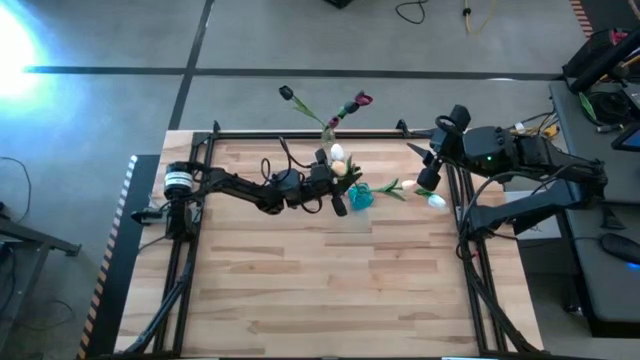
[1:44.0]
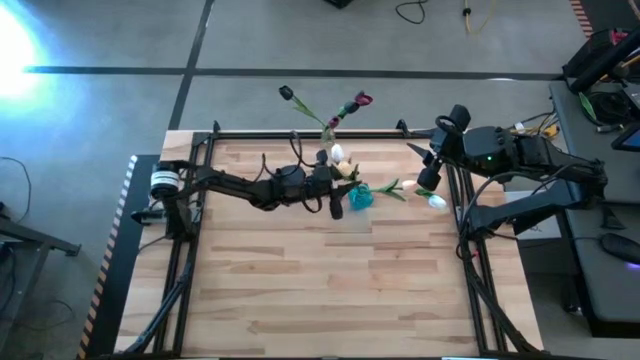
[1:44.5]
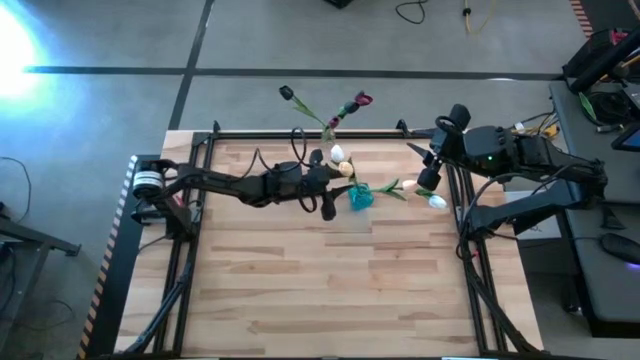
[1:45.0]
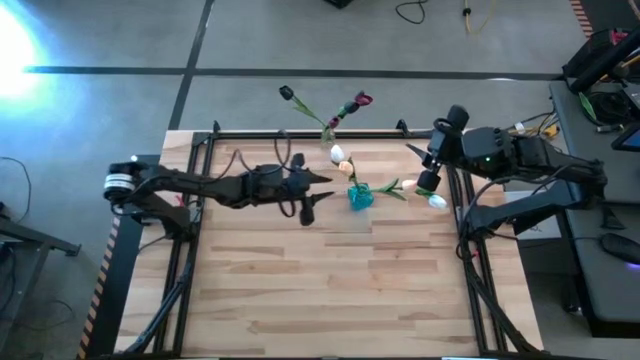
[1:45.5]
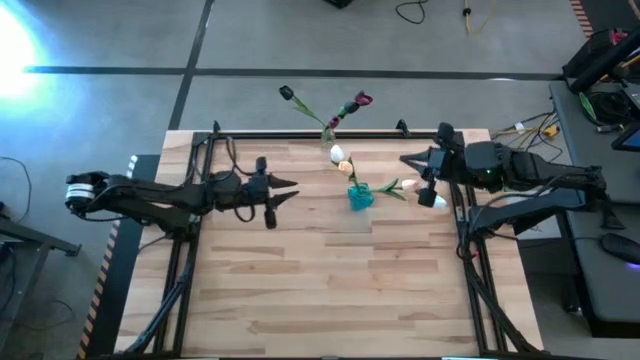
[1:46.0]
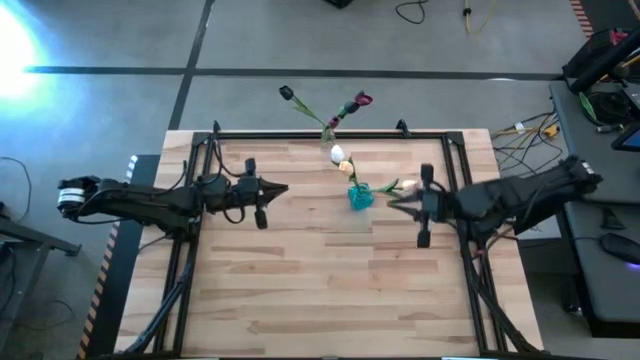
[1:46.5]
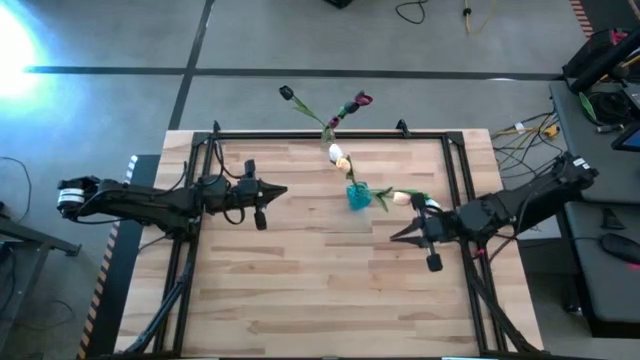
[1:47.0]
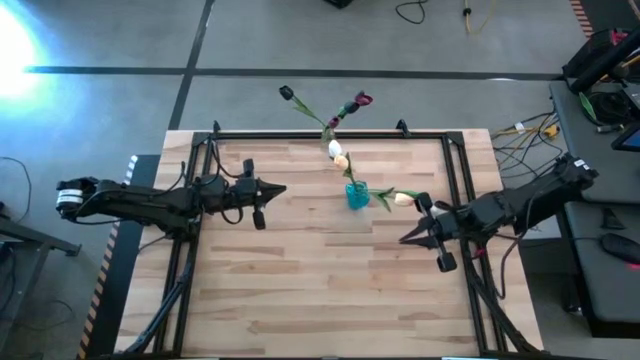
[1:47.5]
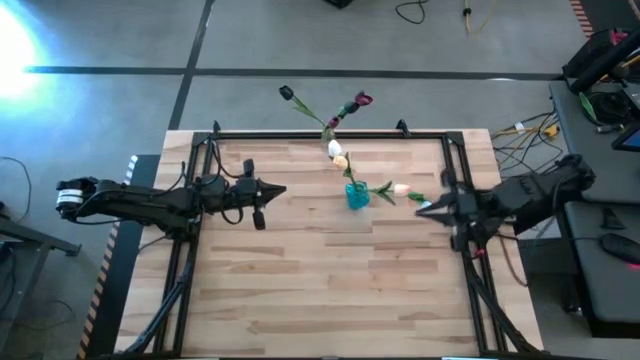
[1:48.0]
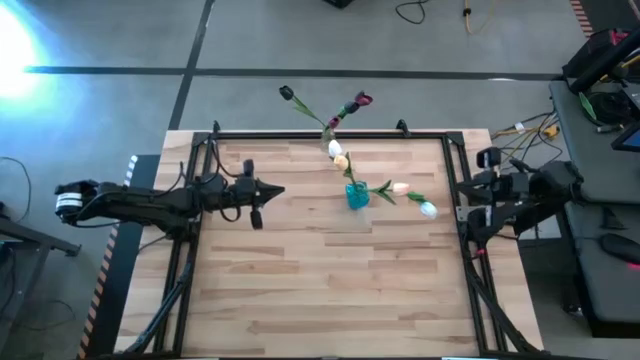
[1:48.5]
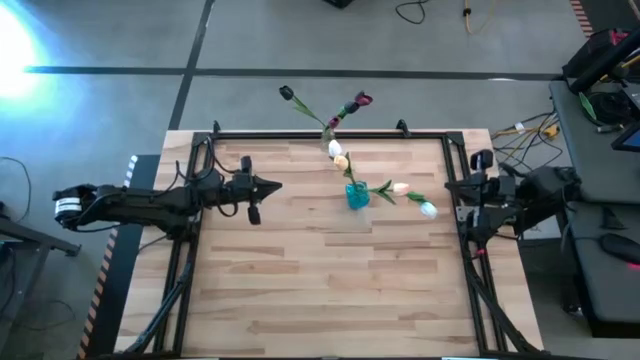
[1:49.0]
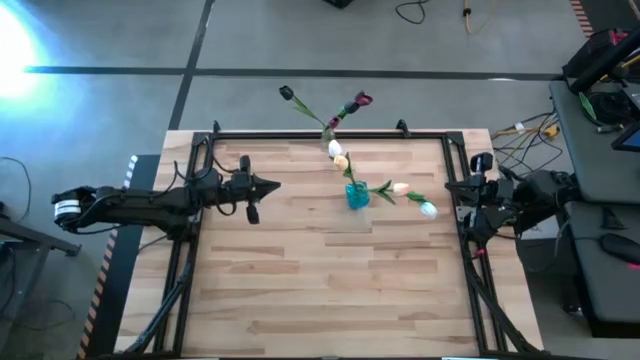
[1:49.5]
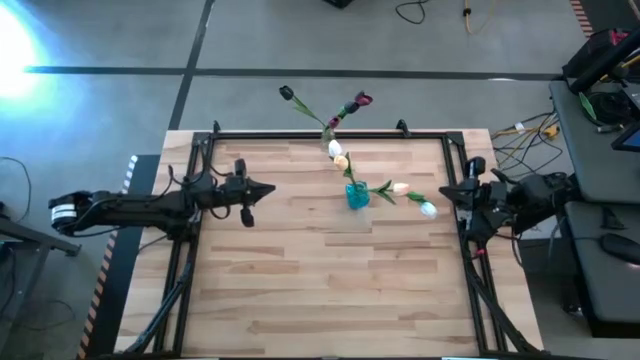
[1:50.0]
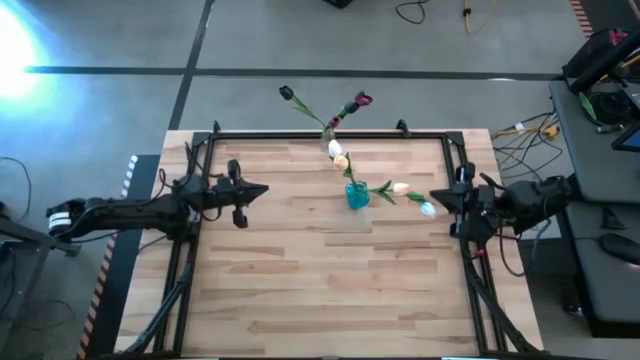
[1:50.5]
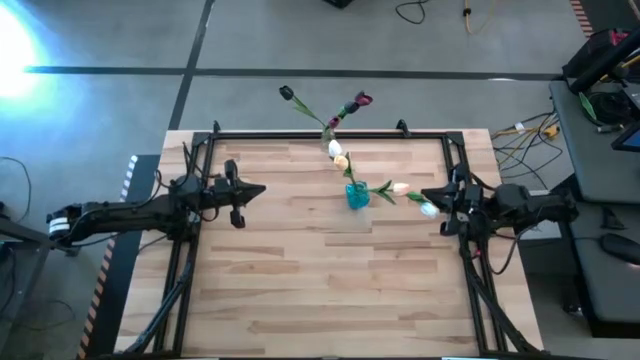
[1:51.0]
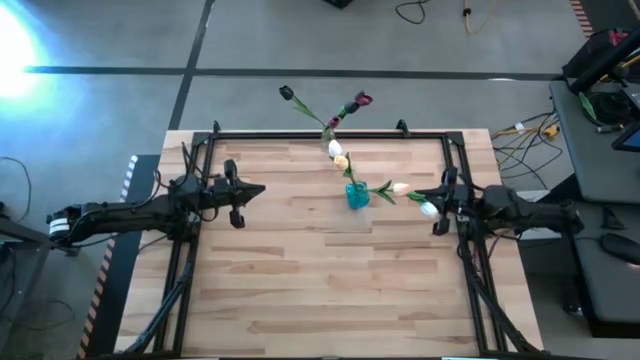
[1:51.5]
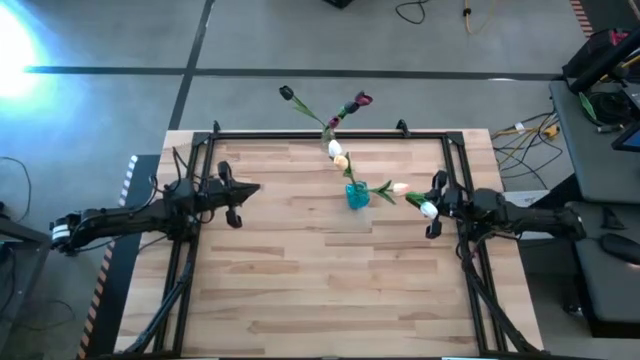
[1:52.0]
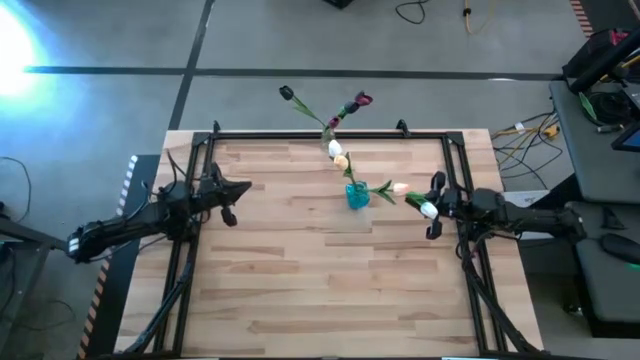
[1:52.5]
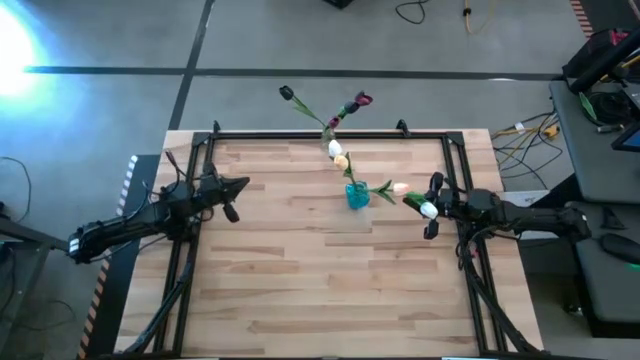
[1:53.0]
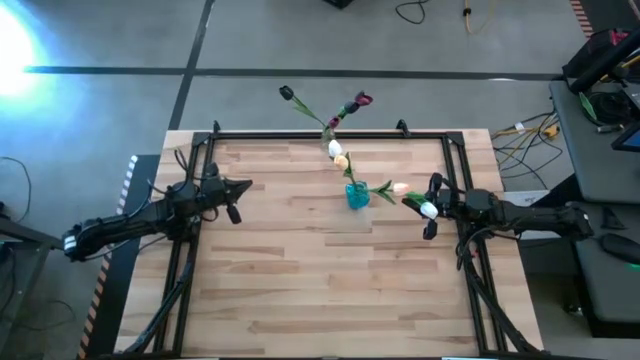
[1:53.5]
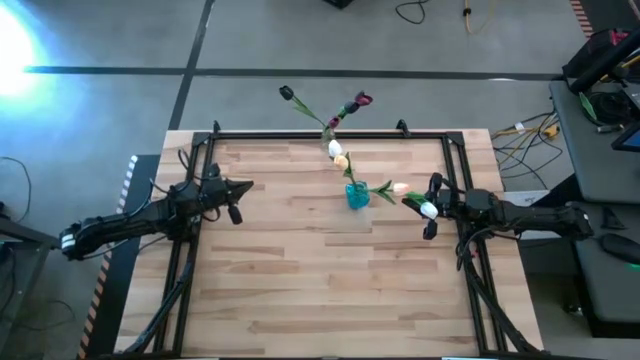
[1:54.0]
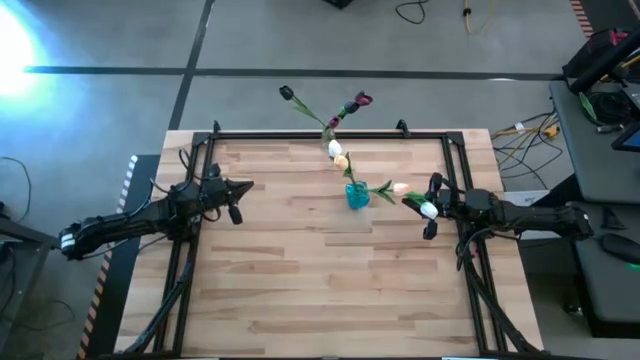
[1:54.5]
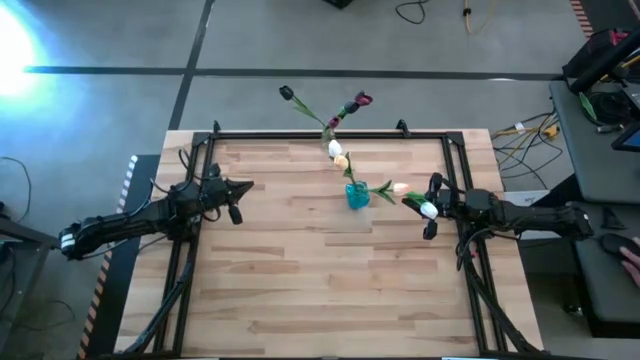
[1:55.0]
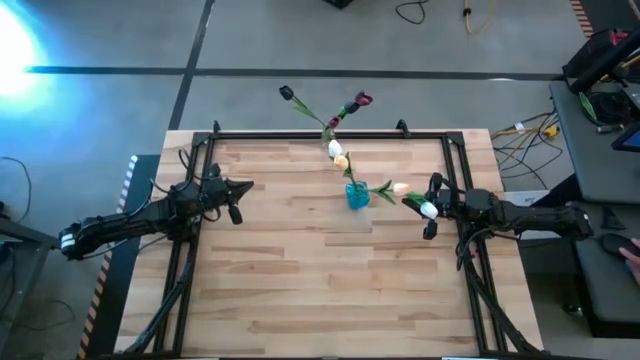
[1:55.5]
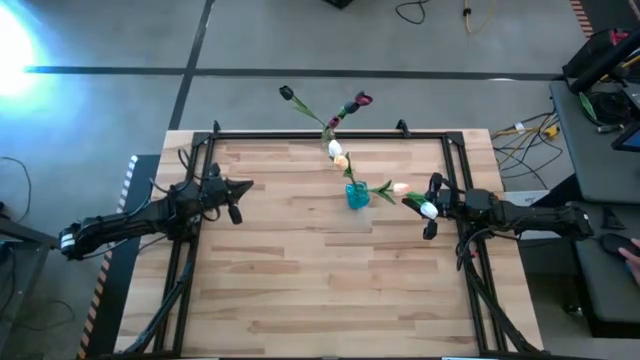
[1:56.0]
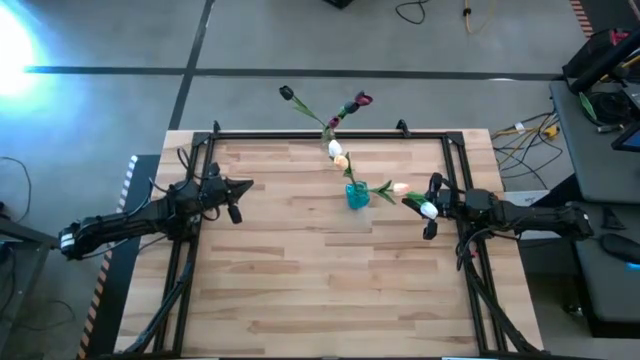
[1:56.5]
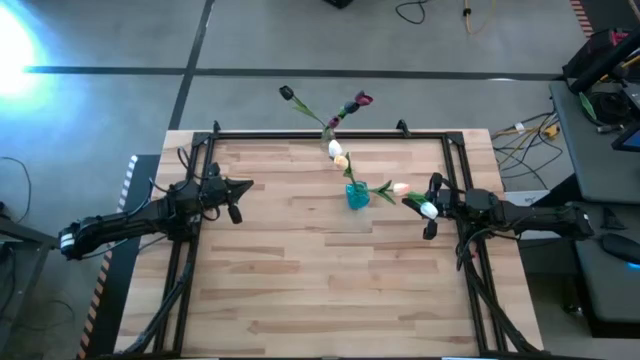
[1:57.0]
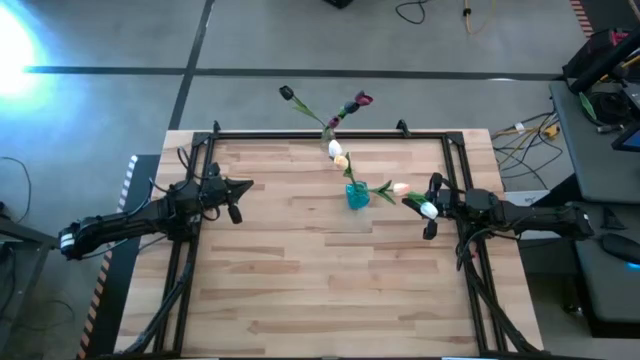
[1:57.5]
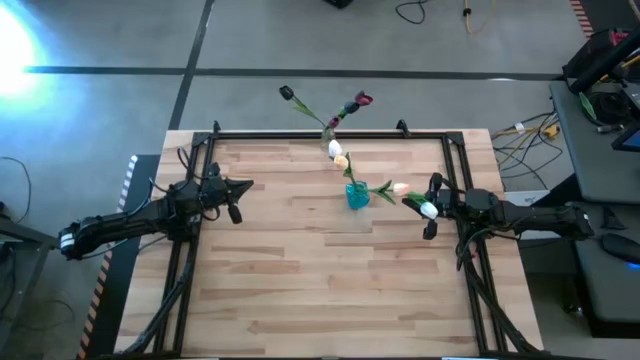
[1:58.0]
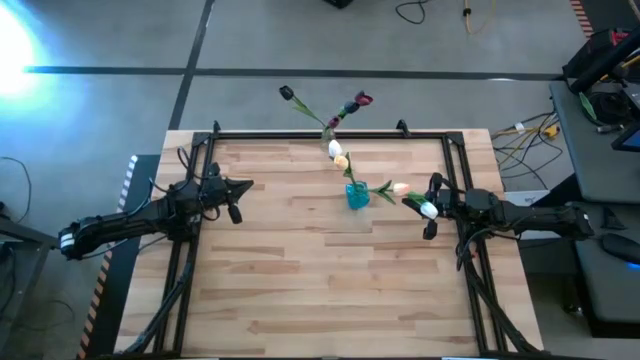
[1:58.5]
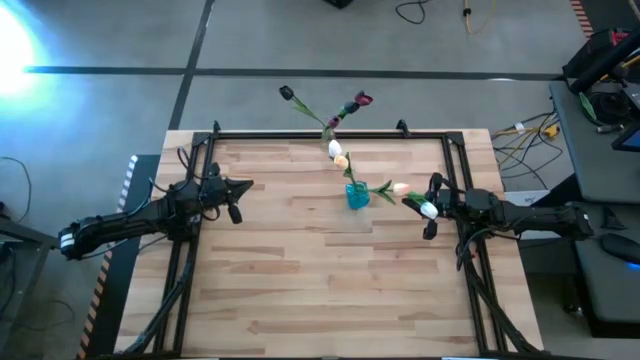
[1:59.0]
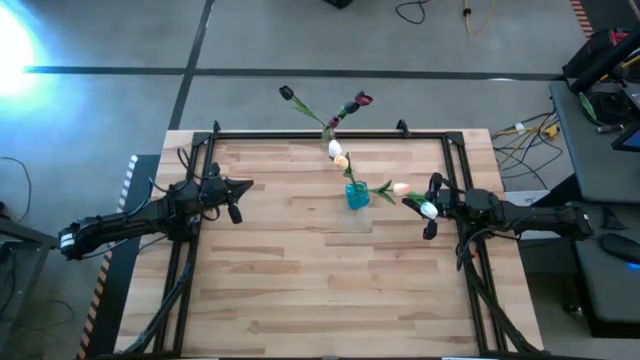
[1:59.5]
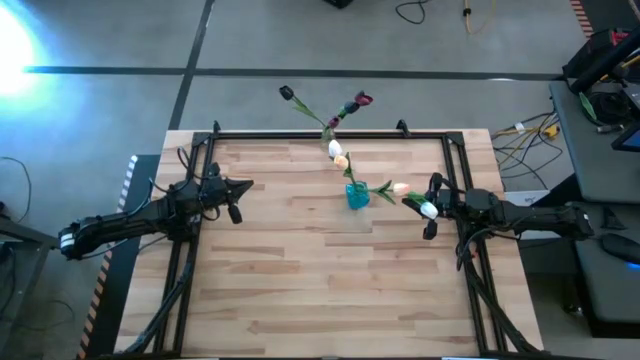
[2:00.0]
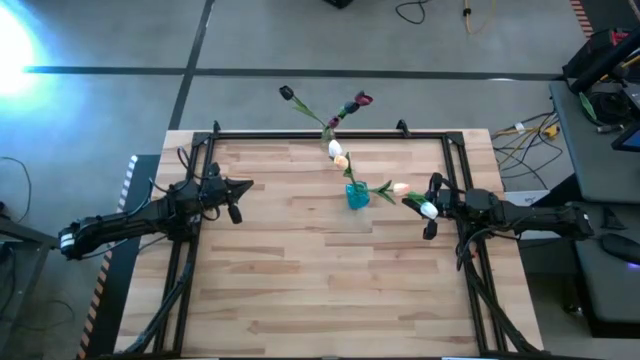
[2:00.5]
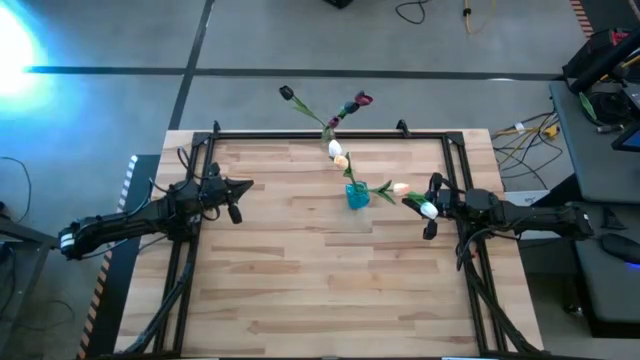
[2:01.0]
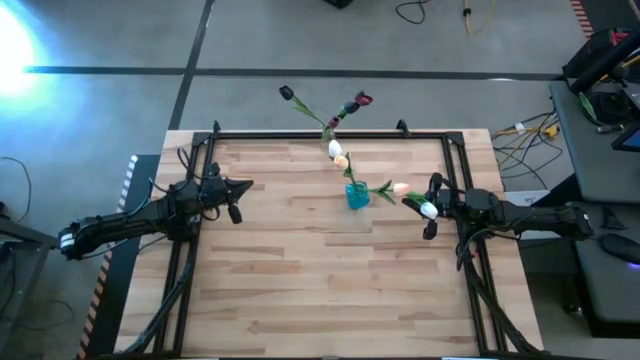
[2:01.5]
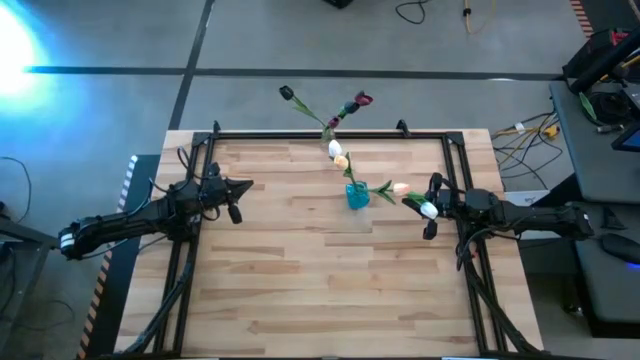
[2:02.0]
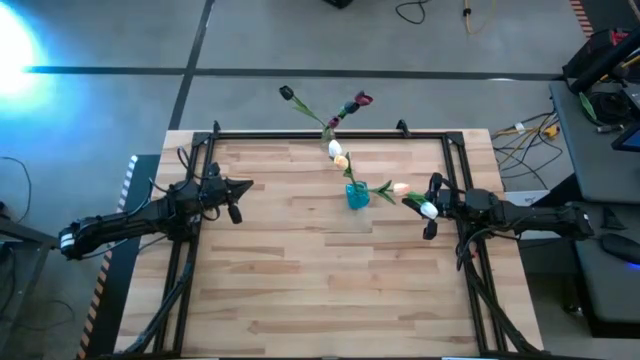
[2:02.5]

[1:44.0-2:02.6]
Task: Sort flowers into vase by color
Return to Home Position

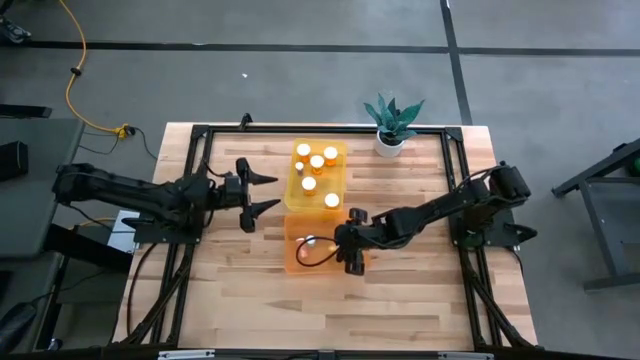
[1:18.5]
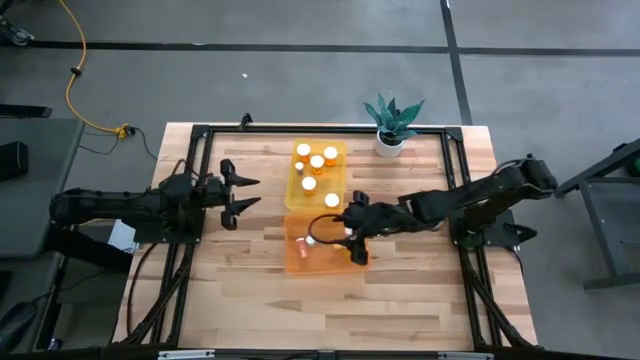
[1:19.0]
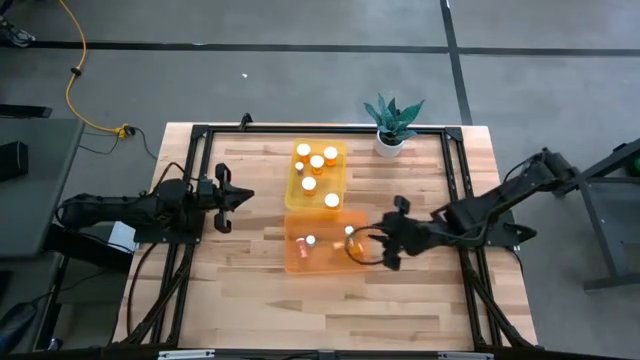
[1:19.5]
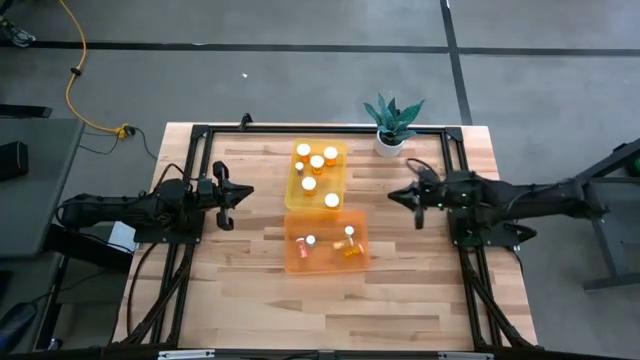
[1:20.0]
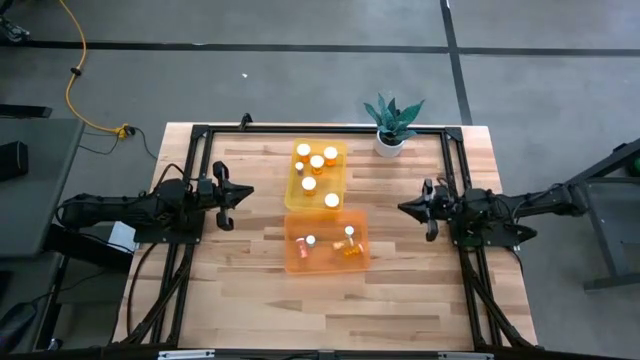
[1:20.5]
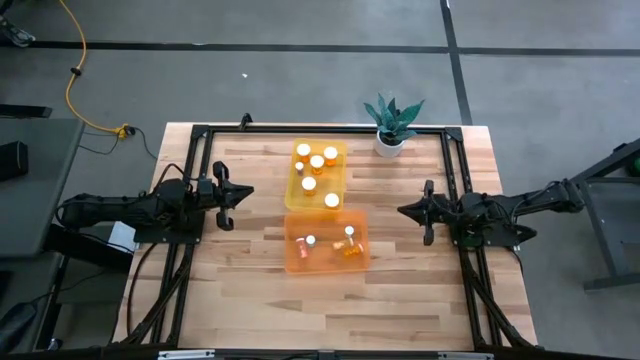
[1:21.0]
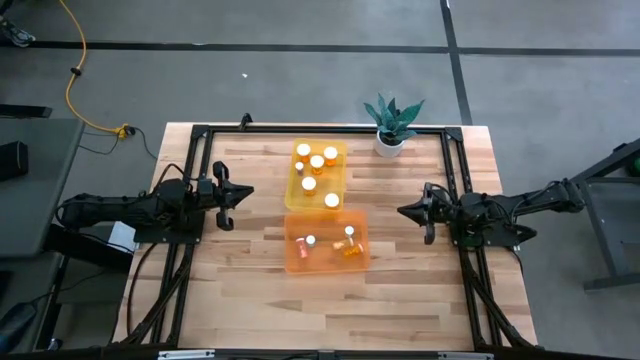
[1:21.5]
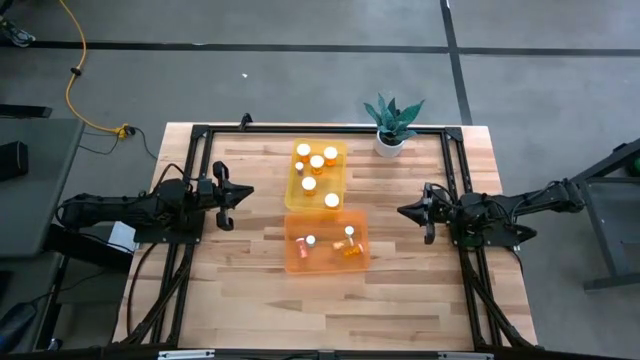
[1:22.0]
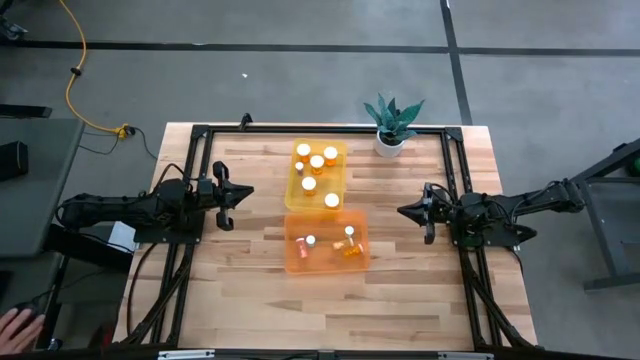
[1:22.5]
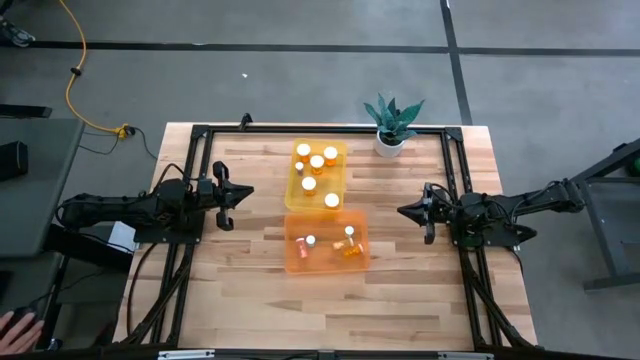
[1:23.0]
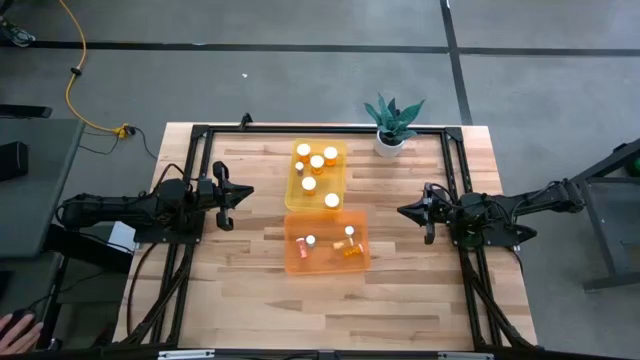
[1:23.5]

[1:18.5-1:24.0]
Task: Pick and place medicine bottles into bin by pill shape (circle, oval)
Return to Home Position
